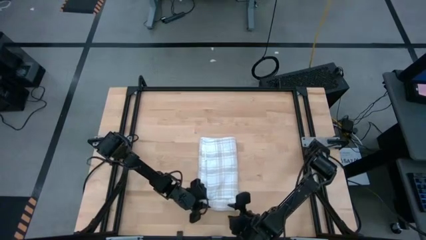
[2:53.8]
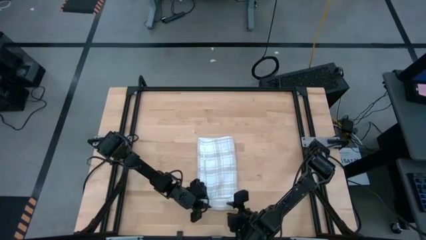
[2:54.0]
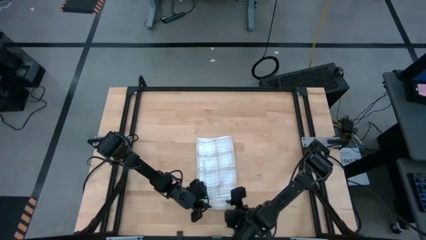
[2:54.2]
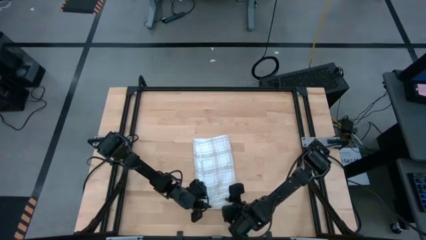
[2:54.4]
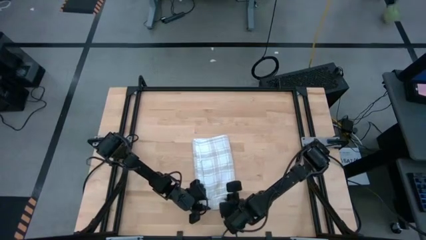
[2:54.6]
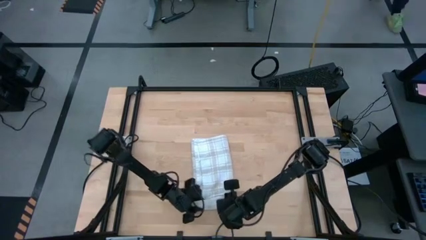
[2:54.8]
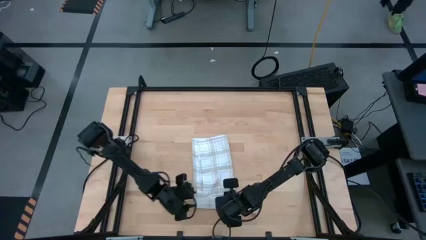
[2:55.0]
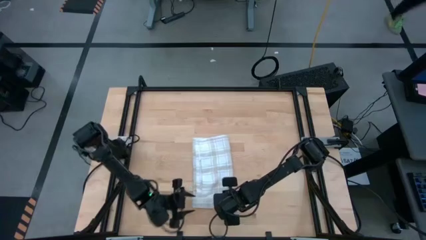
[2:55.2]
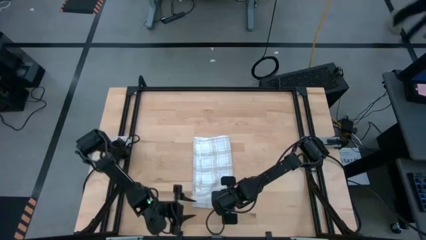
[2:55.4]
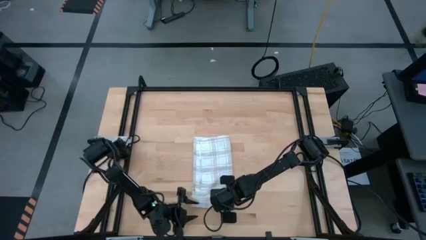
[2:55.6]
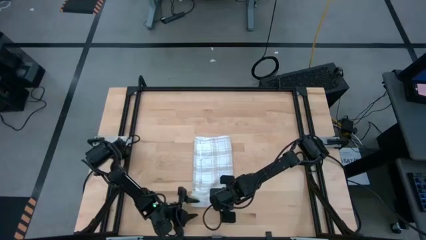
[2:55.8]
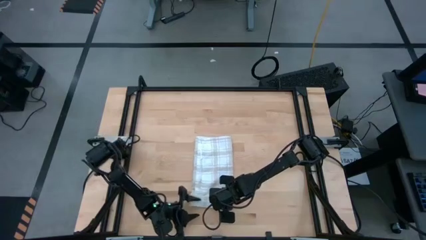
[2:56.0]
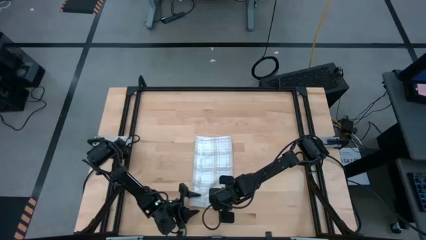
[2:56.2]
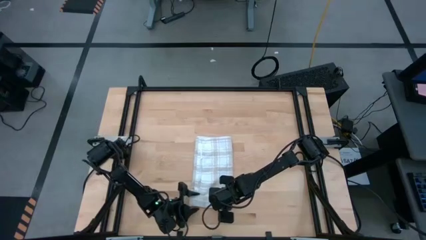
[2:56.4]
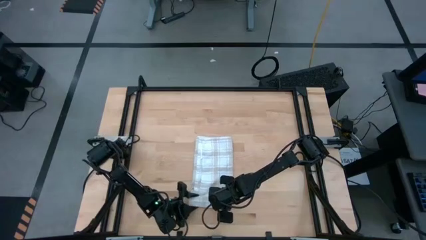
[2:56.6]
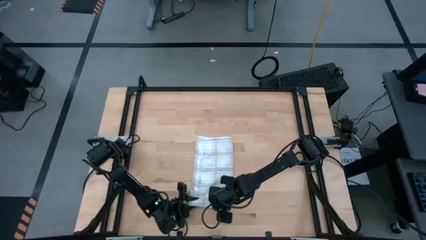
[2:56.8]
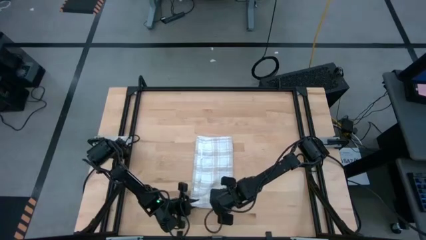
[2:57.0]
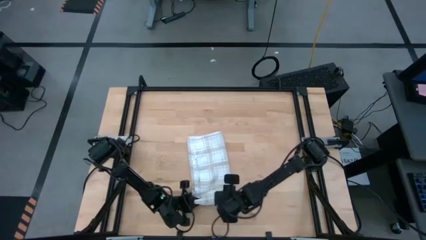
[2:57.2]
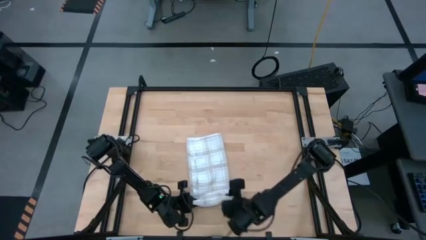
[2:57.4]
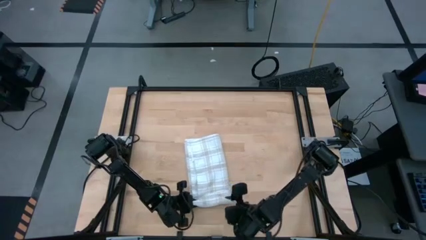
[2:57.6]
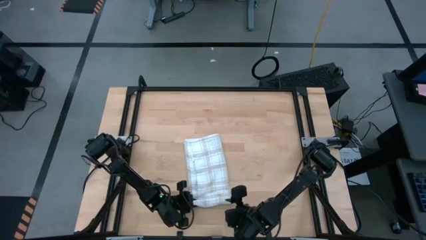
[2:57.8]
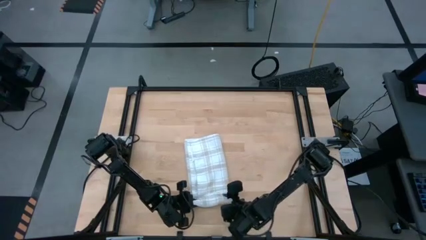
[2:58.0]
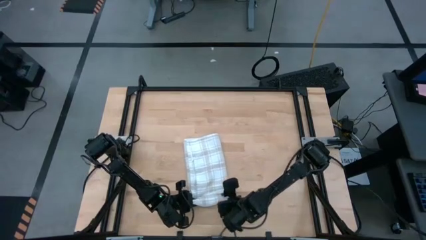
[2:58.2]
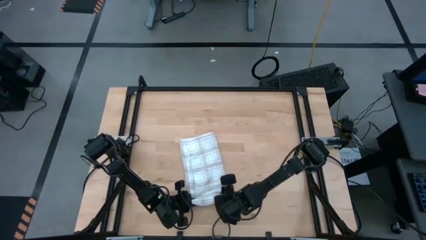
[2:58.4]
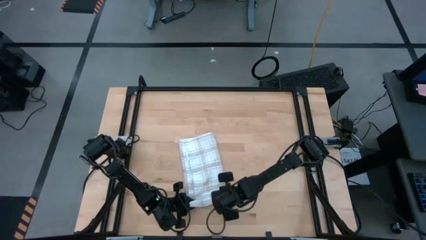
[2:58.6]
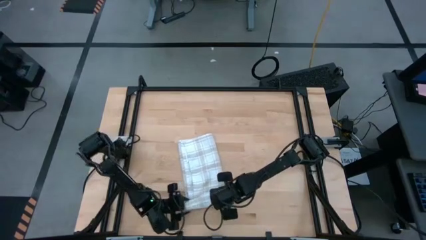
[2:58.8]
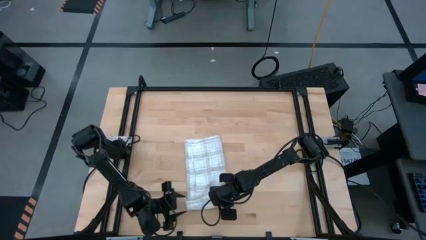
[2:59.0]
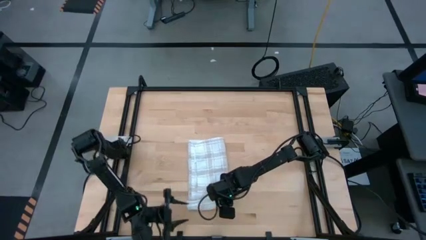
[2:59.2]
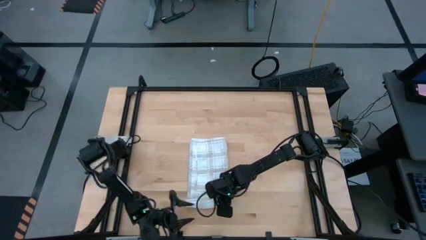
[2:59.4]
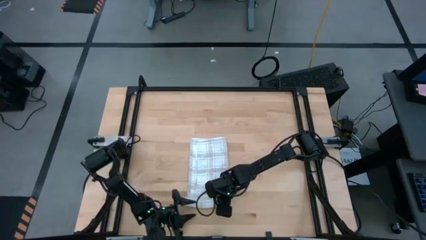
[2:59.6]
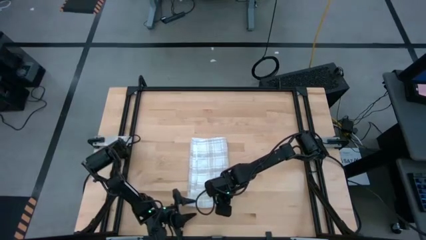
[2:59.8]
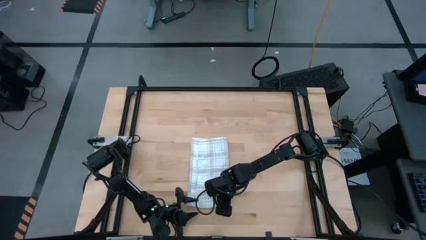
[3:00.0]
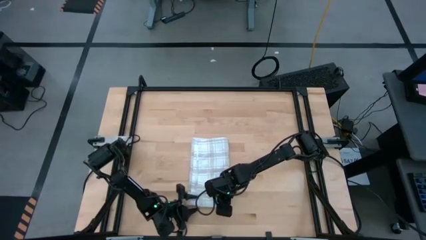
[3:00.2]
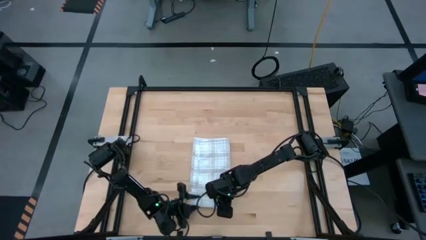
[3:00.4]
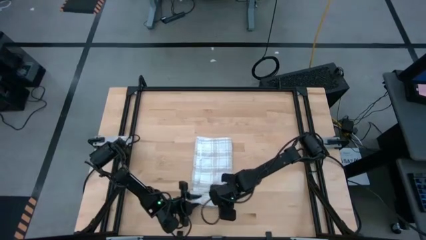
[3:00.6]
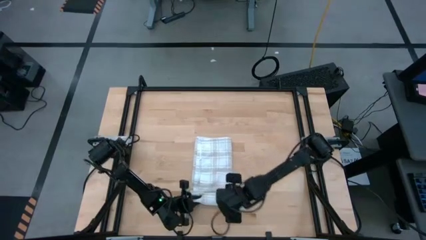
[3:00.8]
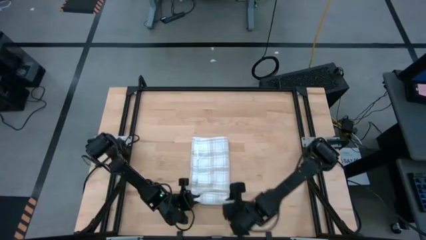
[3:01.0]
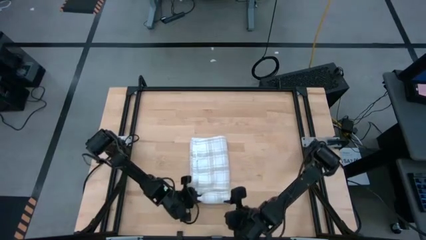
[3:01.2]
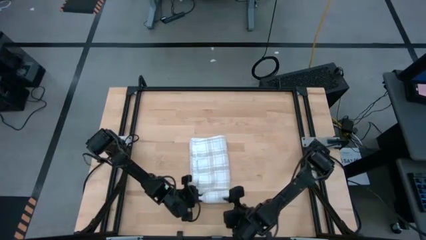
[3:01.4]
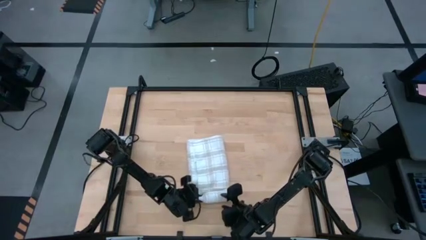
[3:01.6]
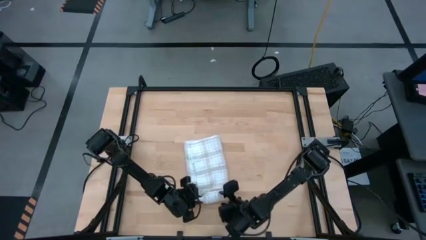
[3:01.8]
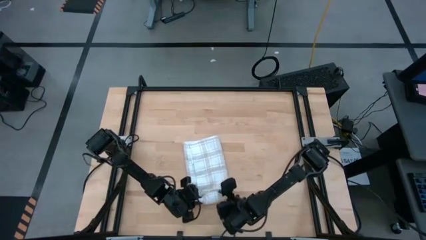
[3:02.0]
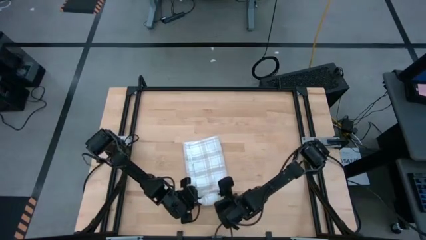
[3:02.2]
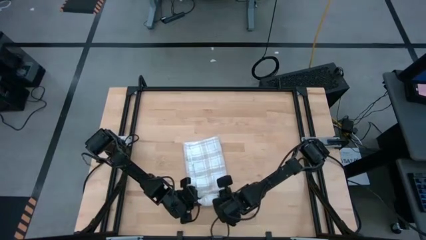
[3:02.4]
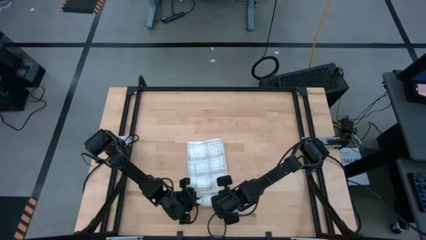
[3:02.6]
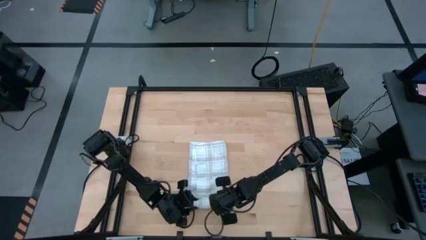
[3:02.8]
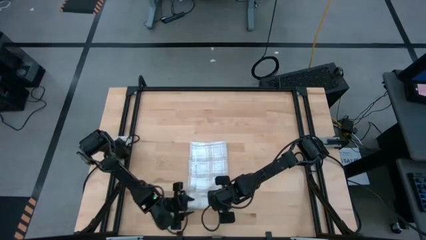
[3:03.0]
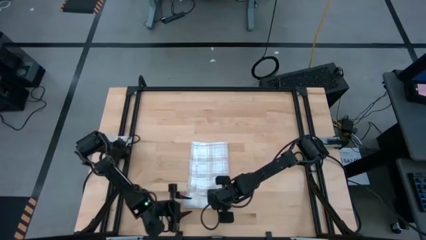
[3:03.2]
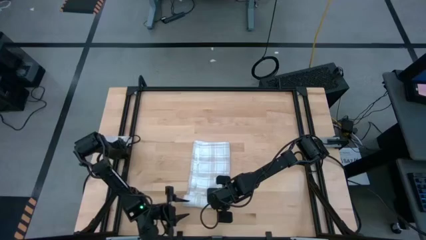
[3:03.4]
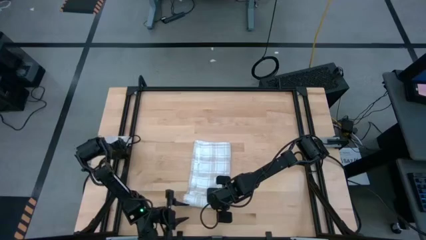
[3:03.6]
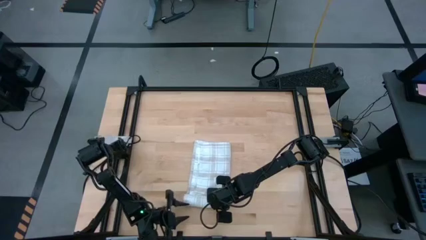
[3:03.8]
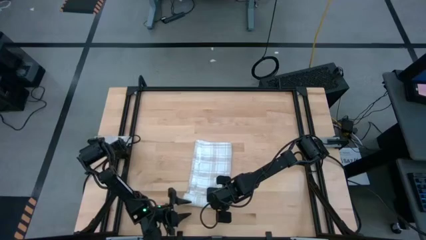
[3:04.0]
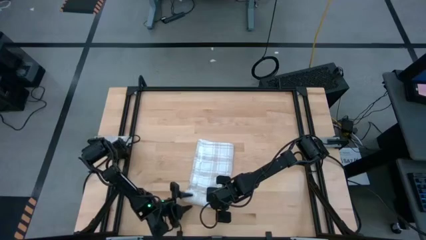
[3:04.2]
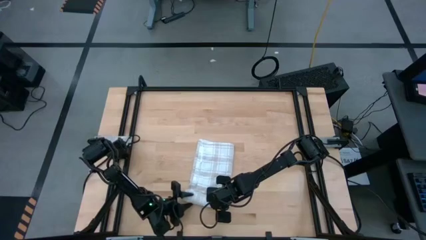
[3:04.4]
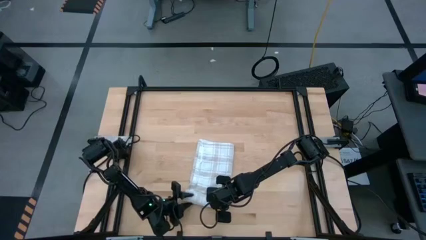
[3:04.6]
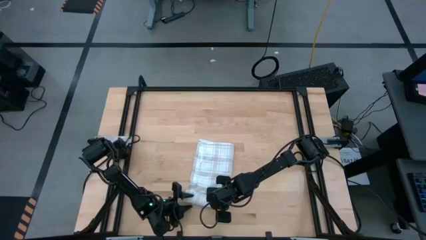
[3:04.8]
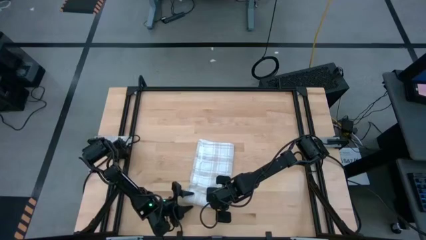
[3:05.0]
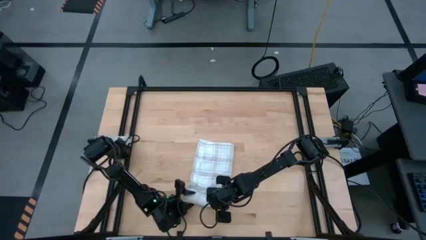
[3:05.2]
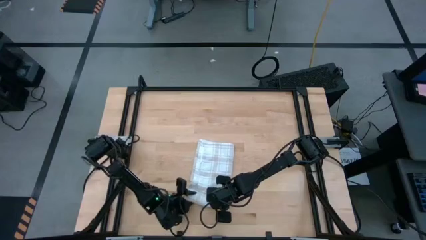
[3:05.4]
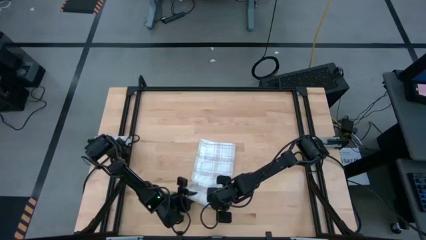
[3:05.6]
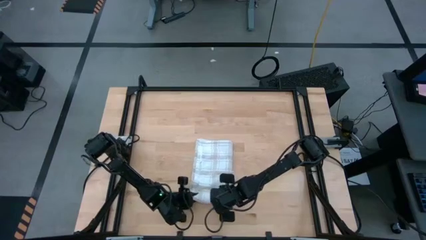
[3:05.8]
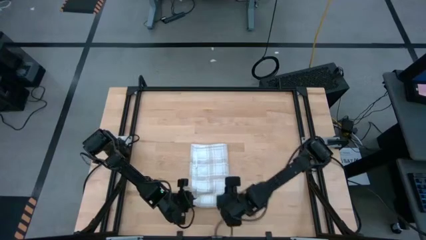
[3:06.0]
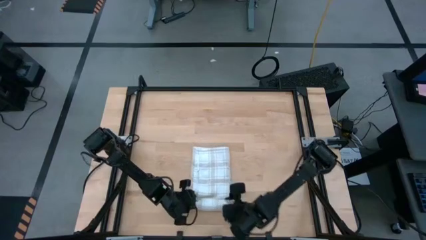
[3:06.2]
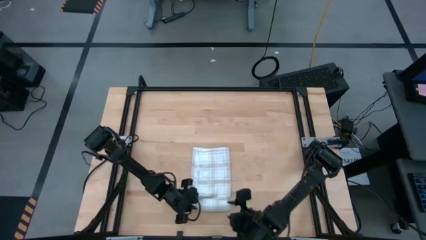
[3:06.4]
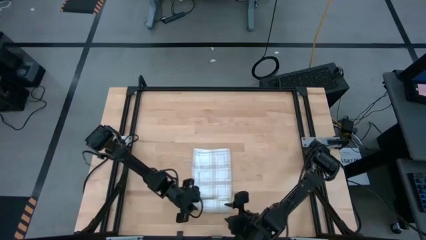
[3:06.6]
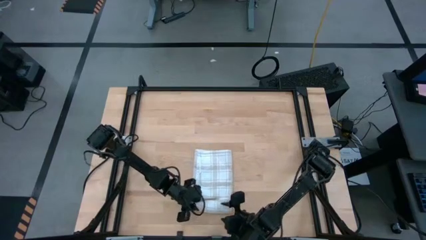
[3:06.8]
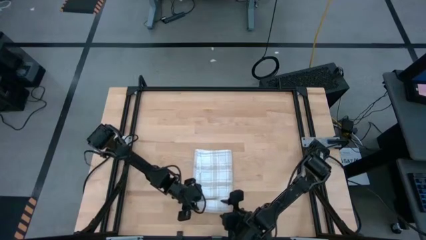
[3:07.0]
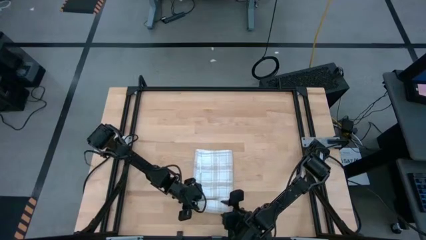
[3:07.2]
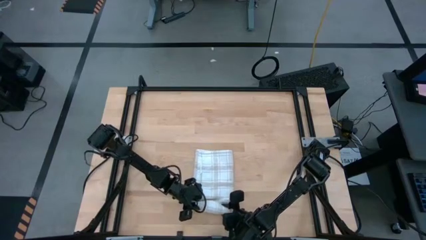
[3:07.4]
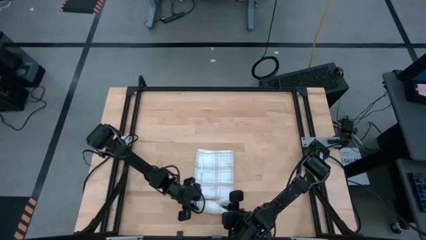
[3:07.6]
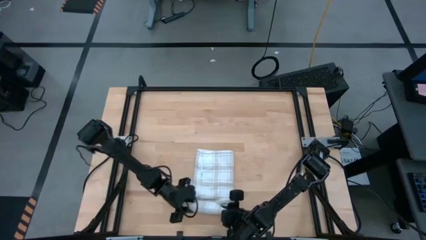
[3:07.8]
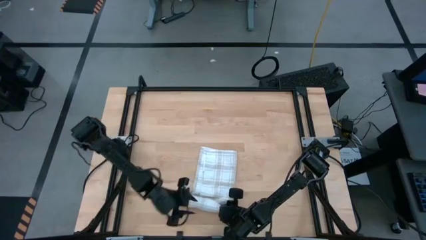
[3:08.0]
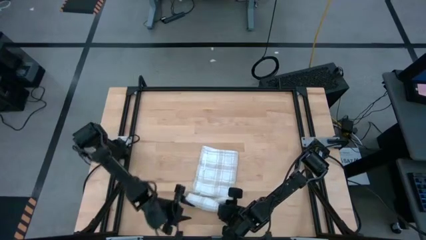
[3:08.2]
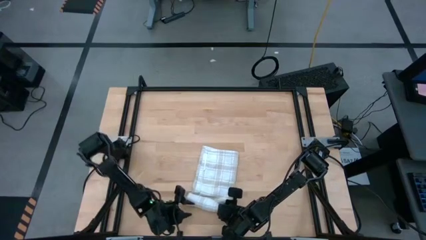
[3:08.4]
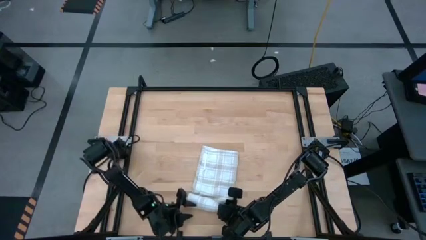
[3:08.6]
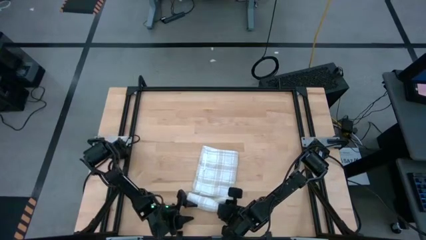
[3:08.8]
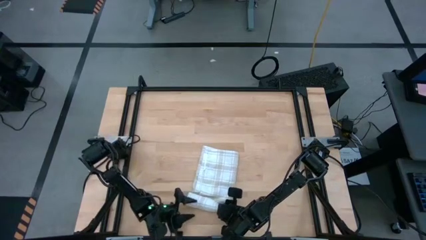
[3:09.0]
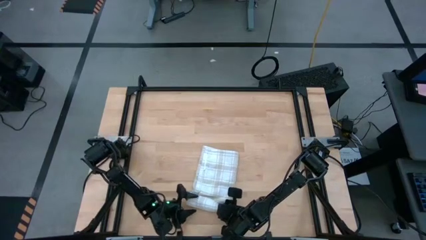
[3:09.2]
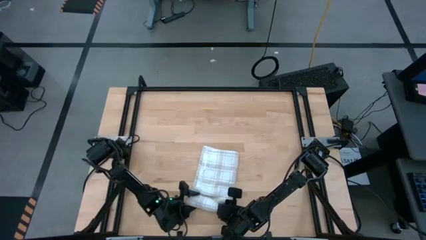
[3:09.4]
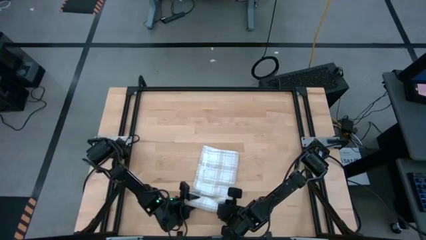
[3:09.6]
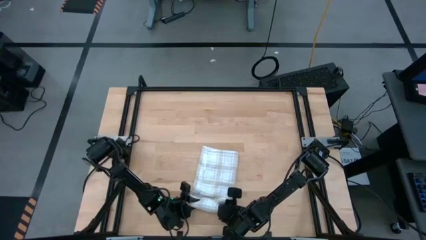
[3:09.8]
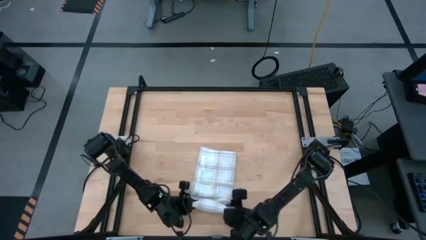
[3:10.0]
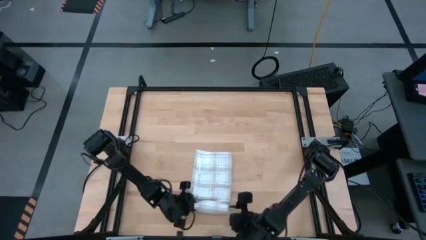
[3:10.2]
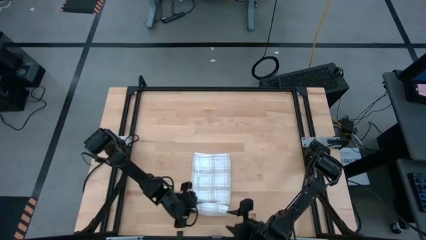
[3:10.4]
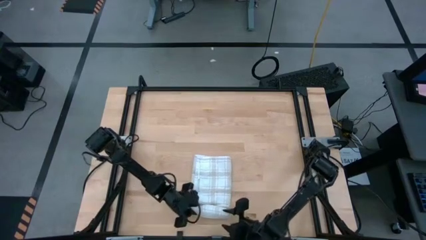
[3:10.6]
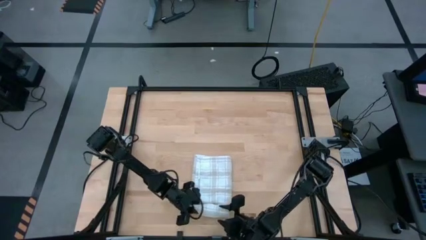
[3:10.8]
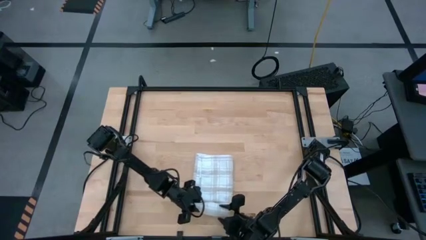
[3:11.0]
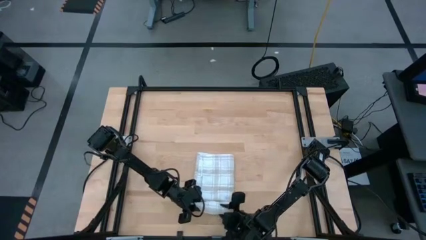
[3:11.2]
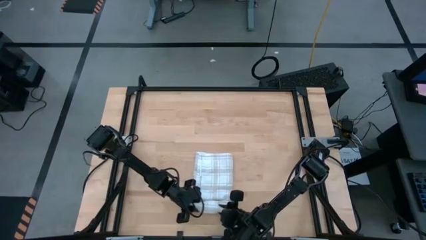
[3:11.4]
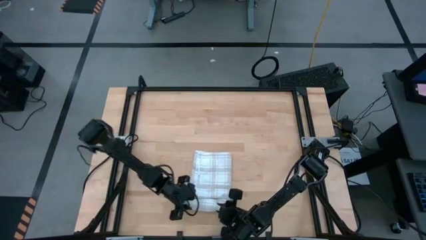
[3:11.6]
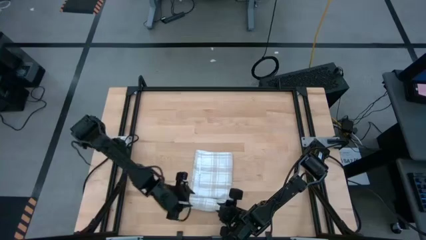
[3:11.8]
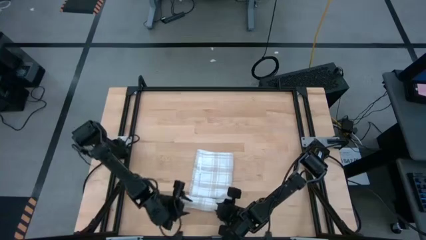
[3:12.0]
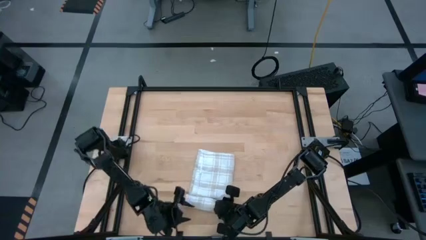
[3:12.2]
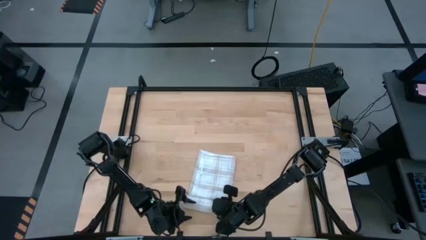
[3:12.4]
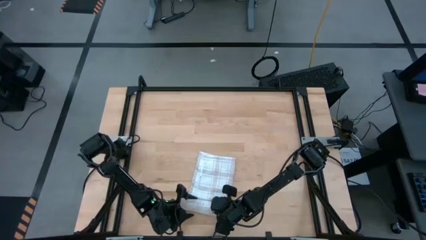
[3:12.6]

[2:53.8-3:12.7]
Task: Roll towel
Roll the white kitchen towel
